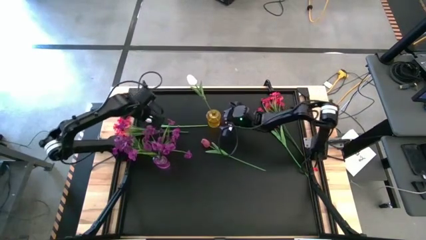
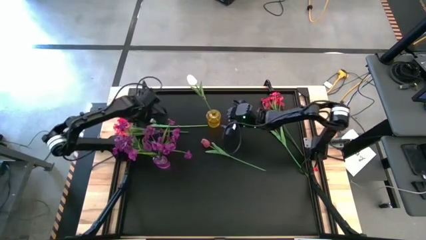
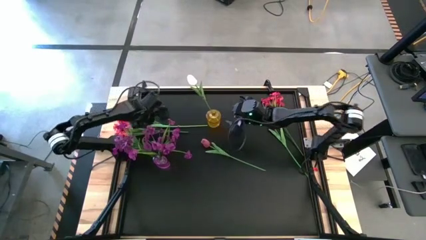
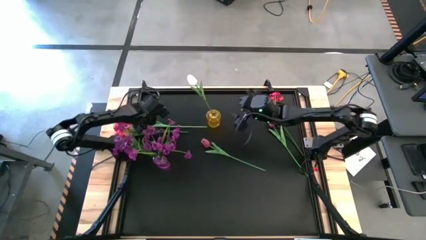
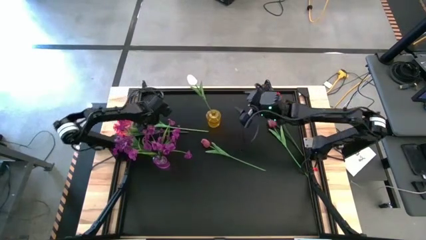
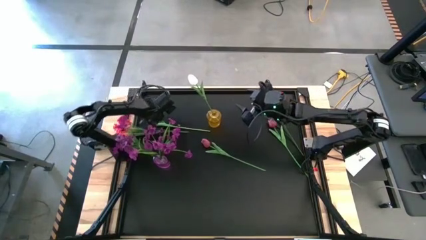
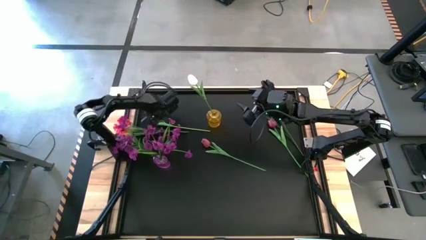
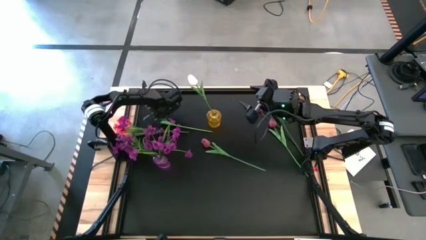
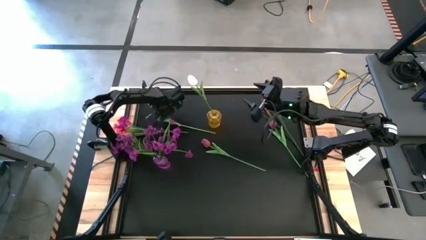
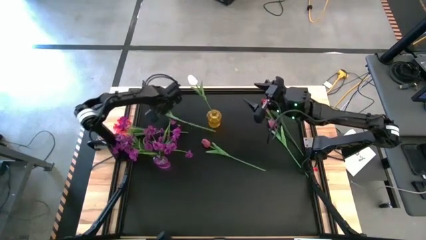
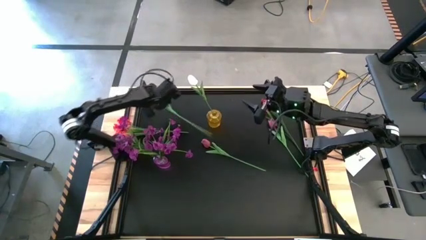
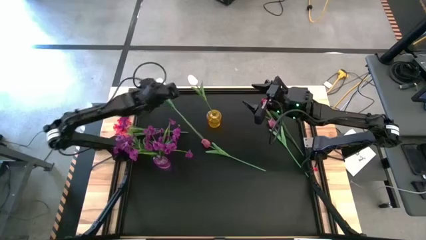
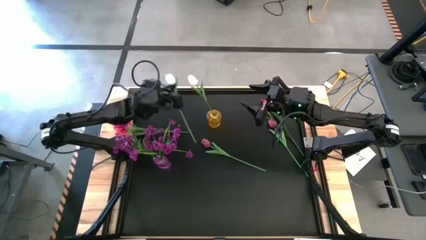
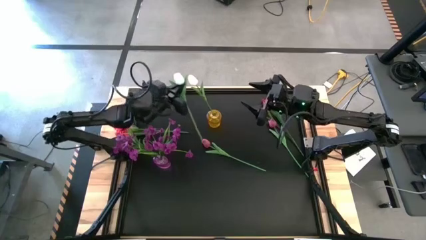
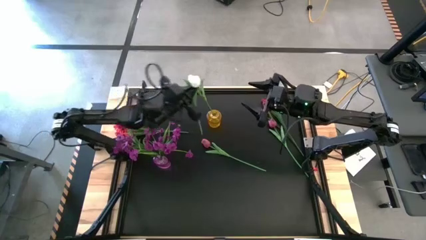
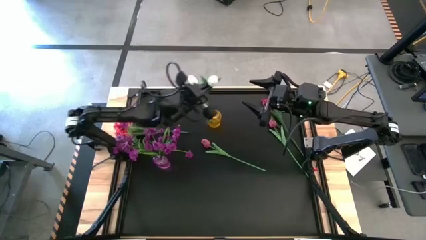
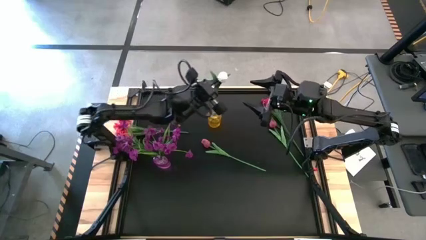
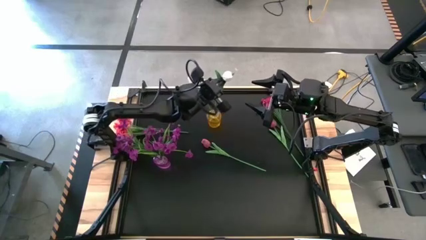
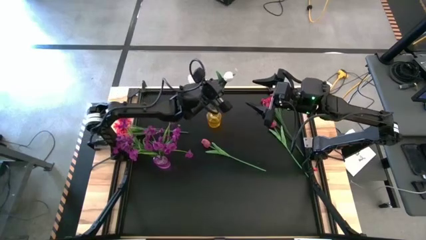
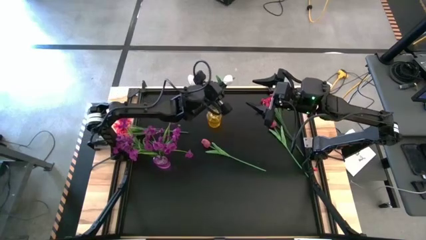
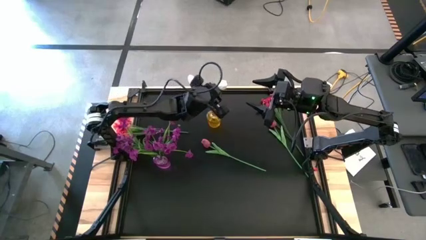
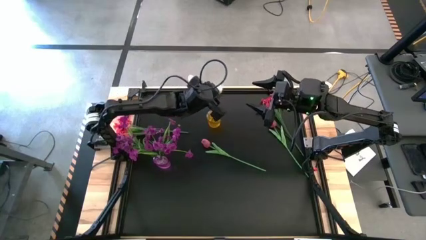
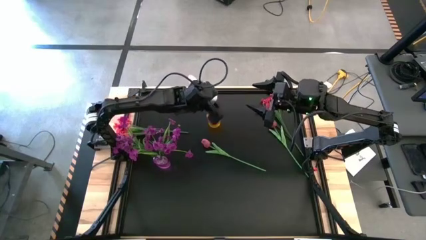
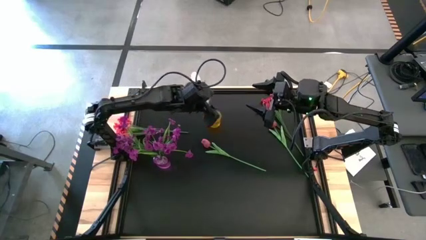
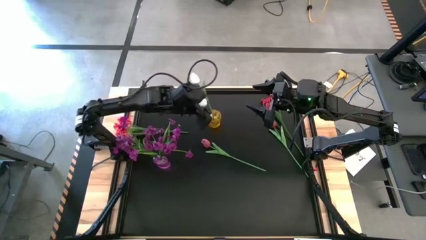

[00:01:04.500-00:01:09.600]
Task: Sort flowers into vase by color
Put the white flower into the yellow vase

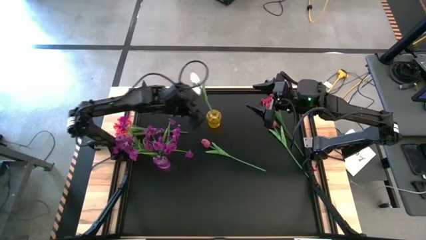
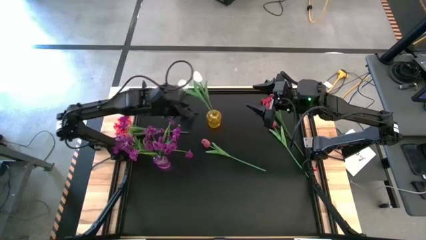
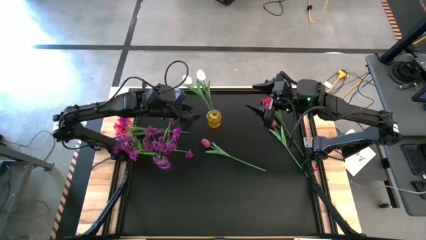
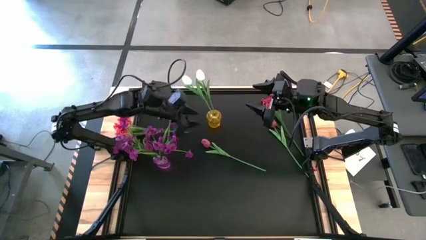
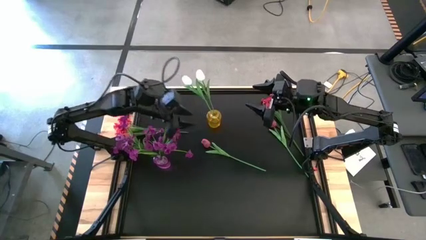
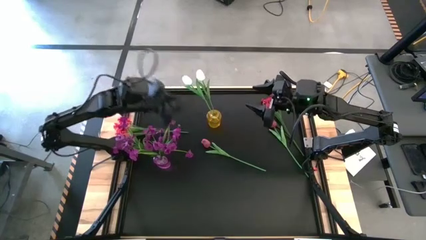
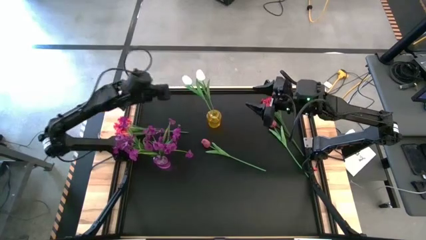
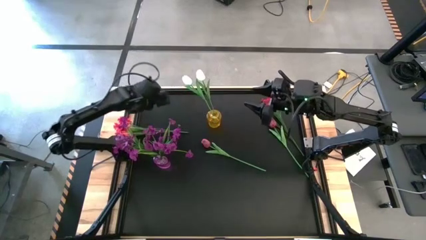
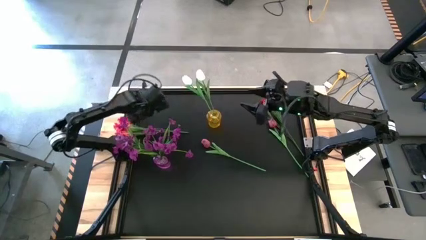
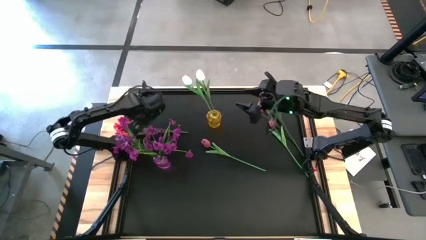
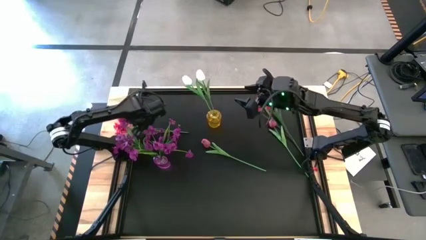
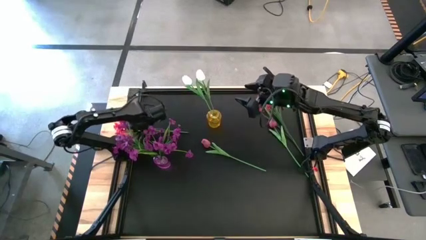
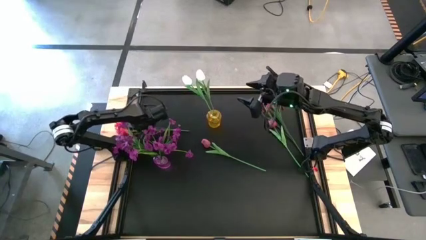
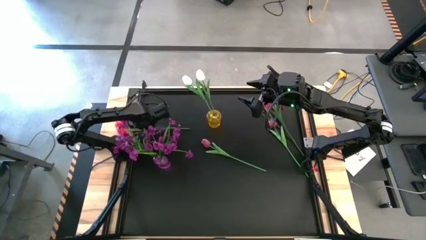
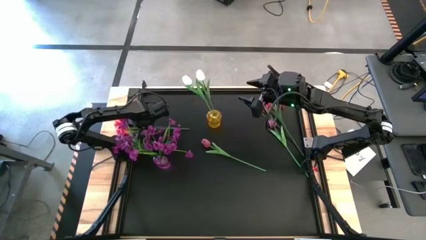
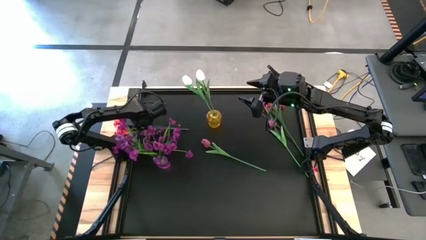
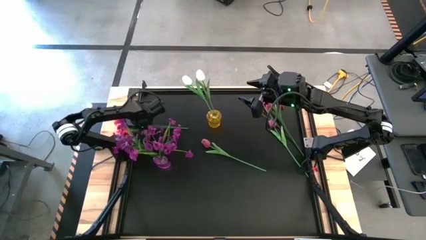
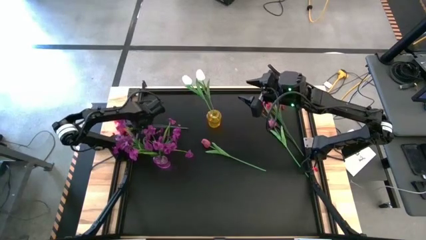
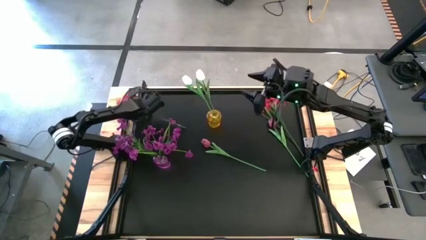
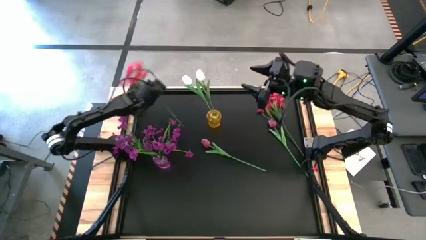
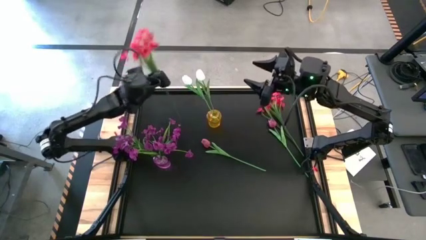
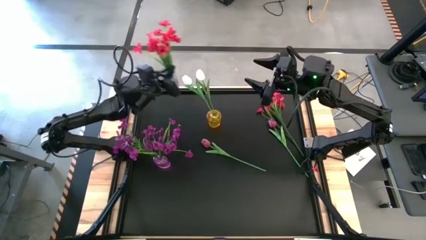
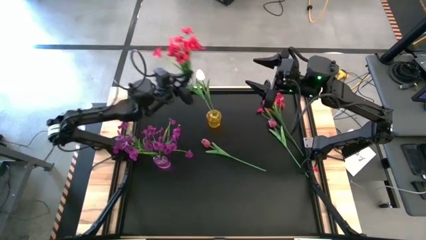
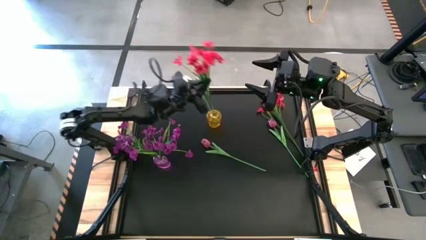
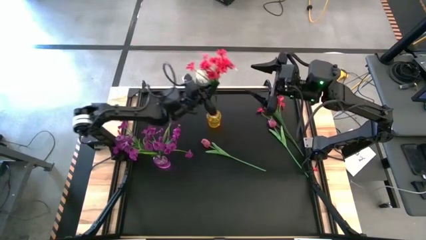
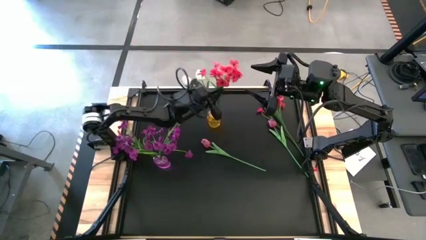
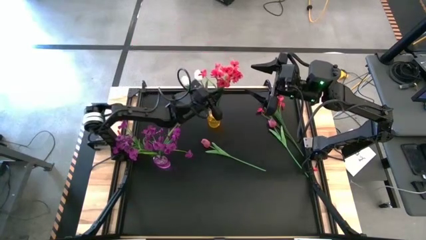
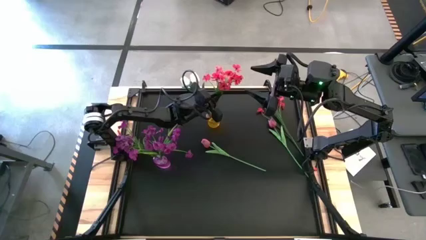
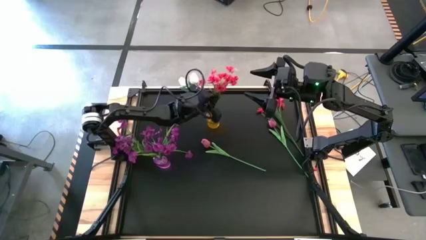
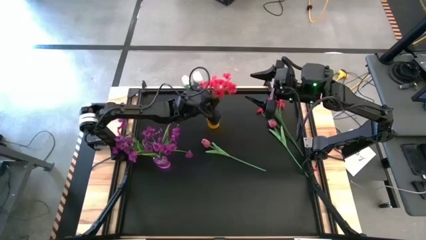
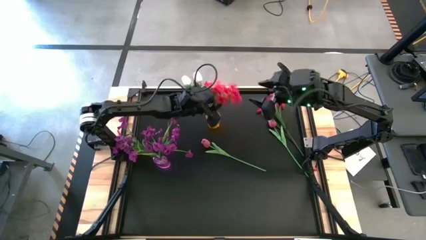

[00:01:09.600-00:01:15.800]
Put the left pink flowers into the yellow vase

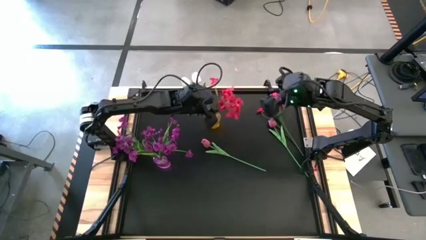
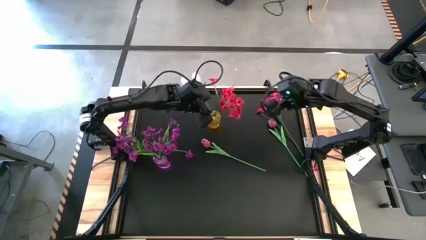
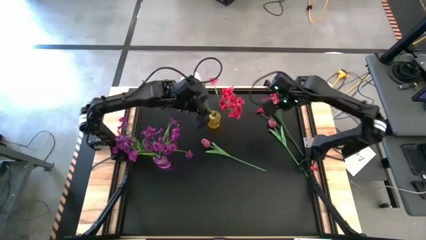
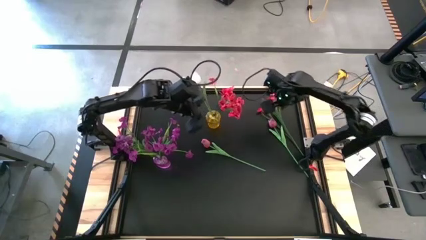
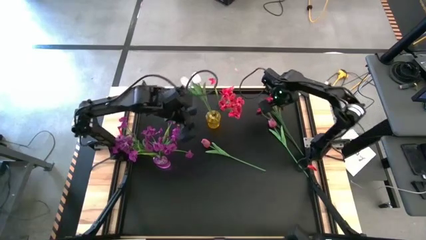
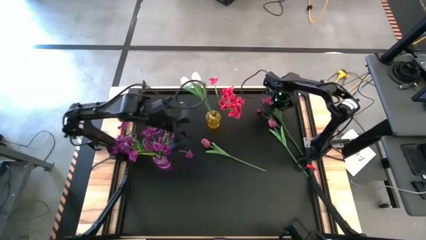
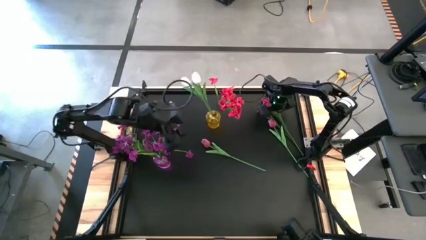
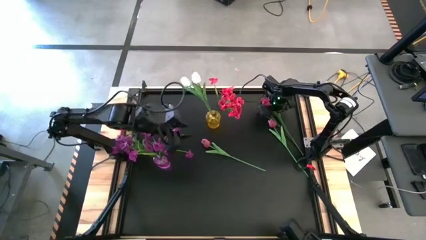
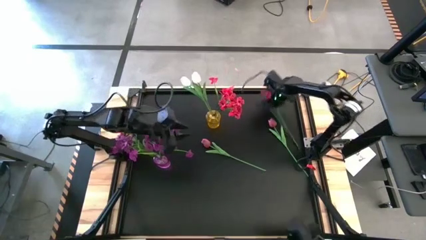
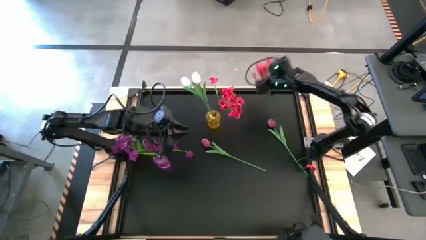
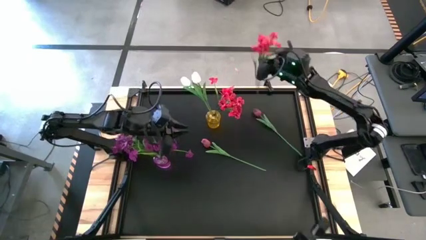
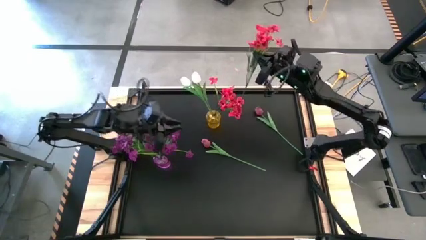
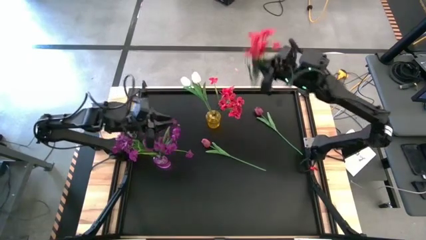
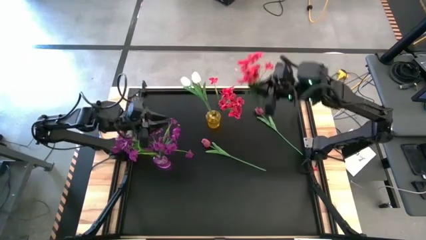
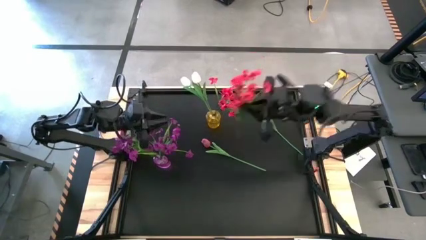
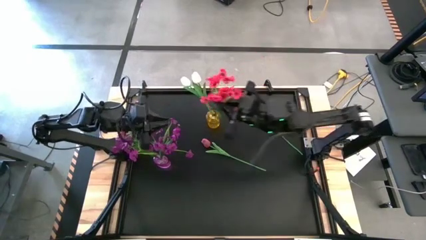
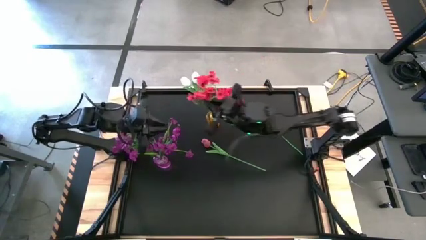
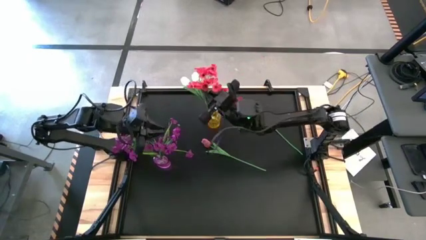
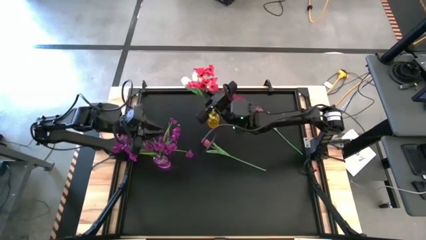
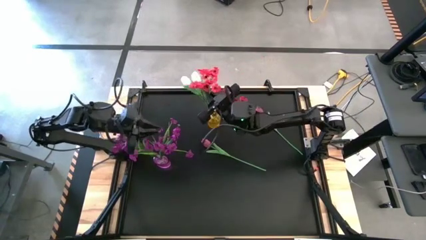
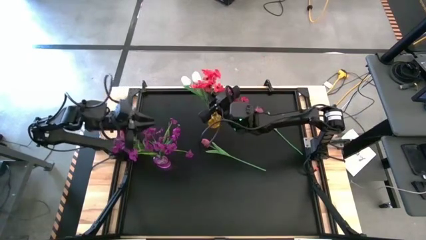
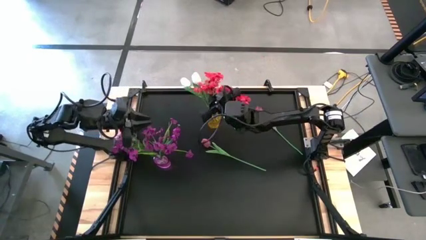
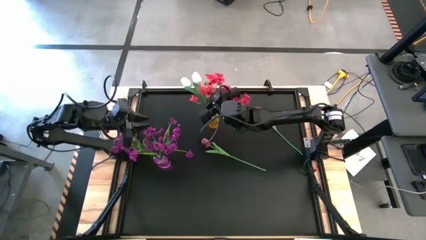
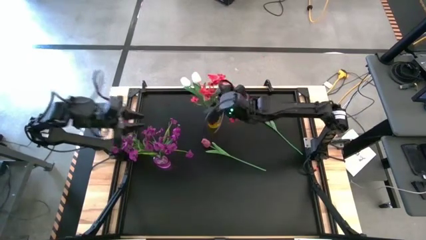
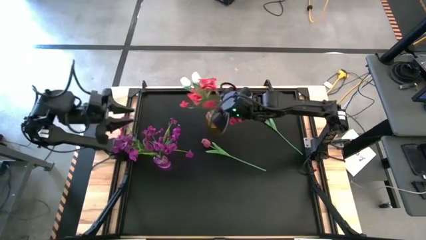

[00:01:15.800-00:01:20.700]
Put the pink flowers into the yellow vase
